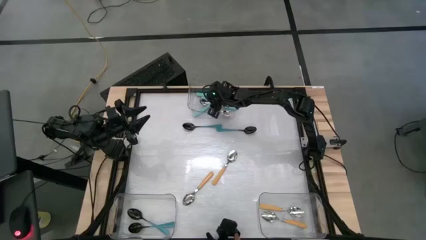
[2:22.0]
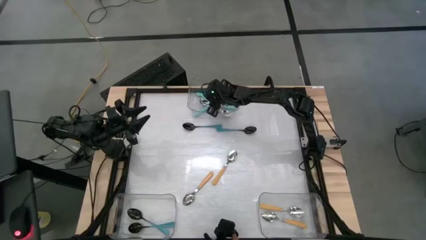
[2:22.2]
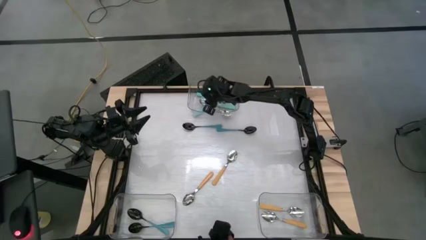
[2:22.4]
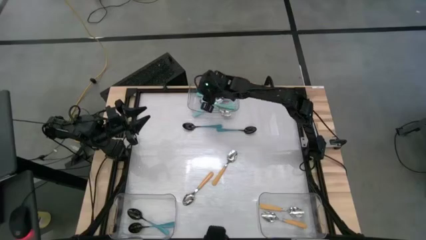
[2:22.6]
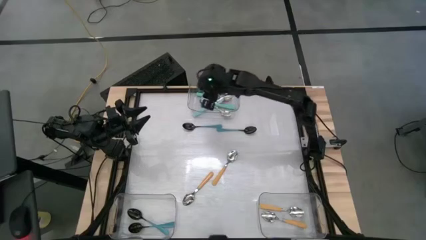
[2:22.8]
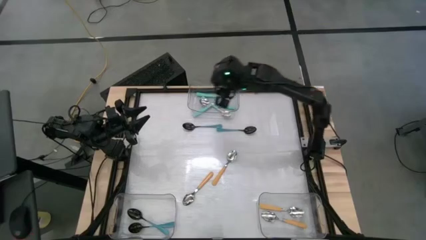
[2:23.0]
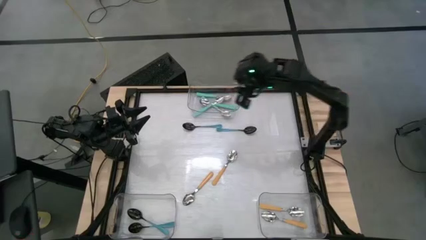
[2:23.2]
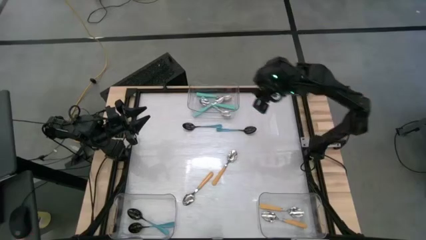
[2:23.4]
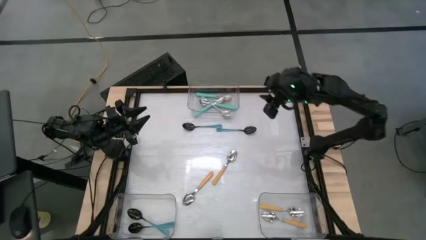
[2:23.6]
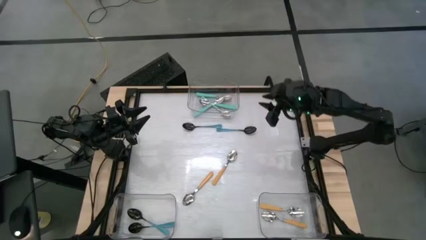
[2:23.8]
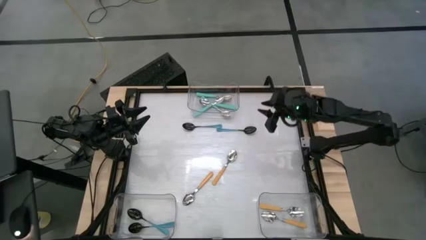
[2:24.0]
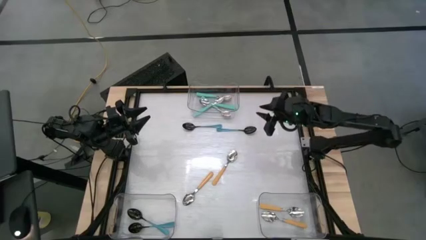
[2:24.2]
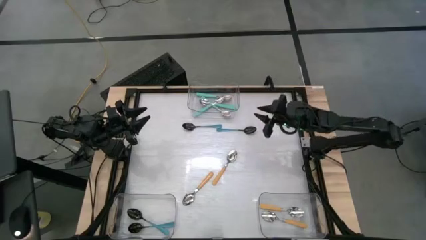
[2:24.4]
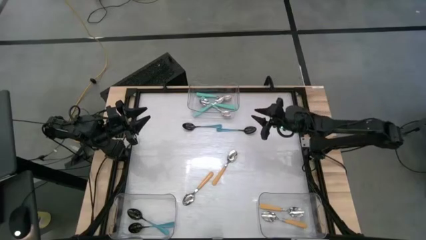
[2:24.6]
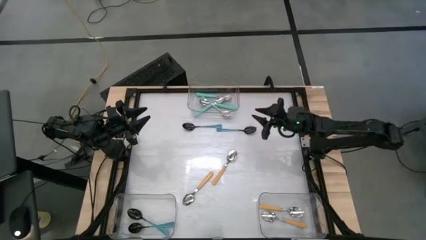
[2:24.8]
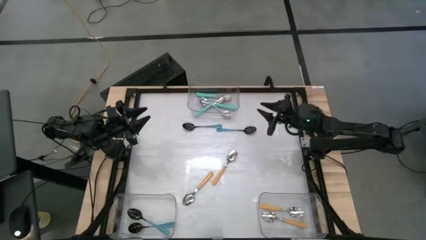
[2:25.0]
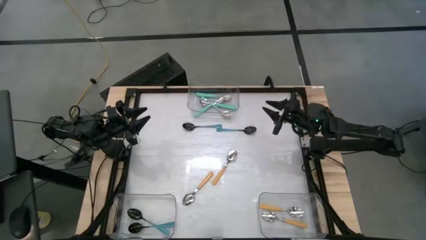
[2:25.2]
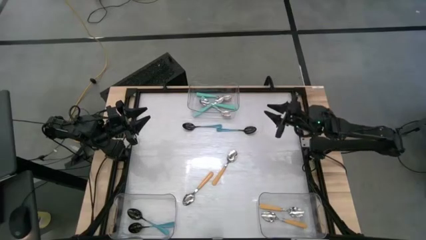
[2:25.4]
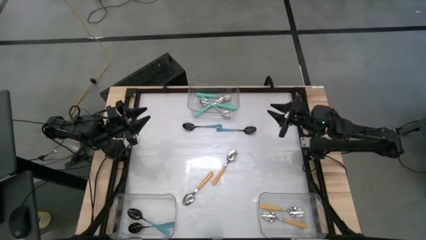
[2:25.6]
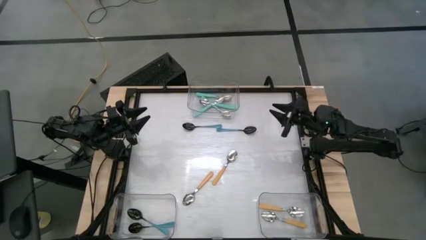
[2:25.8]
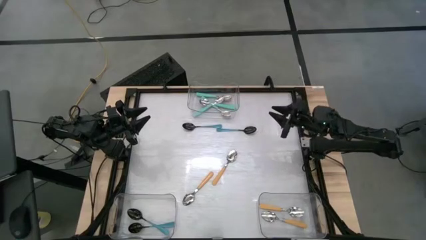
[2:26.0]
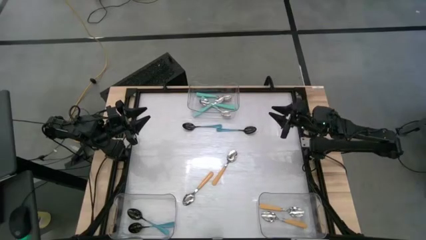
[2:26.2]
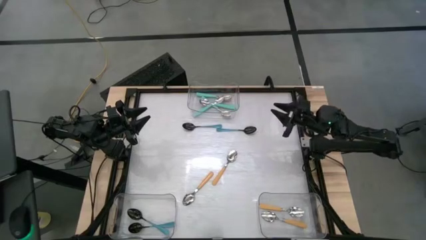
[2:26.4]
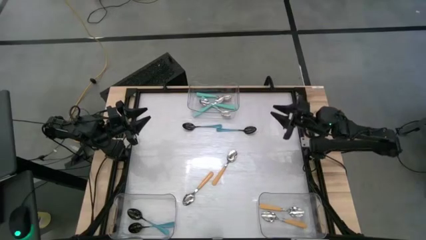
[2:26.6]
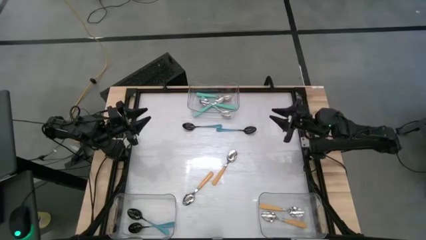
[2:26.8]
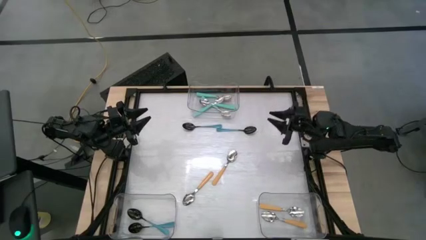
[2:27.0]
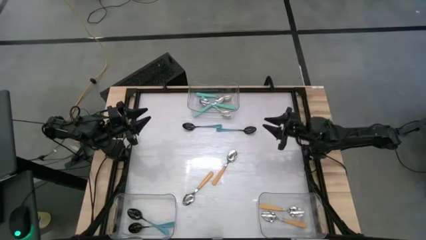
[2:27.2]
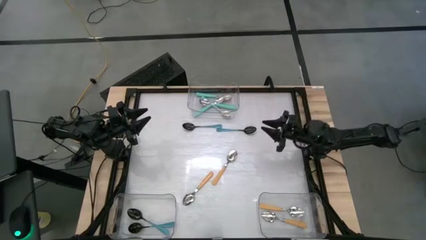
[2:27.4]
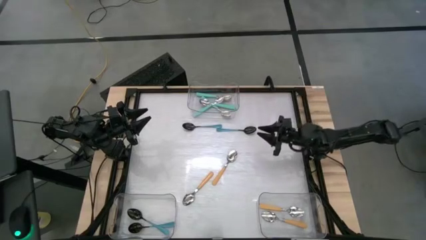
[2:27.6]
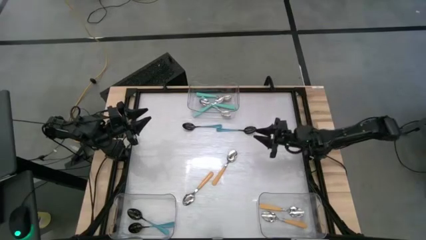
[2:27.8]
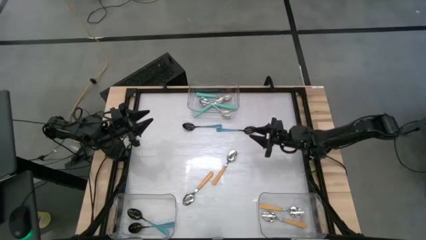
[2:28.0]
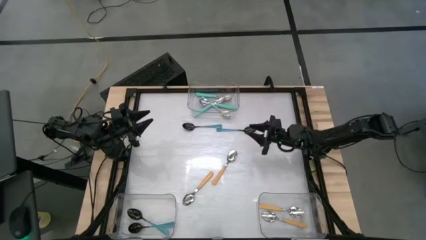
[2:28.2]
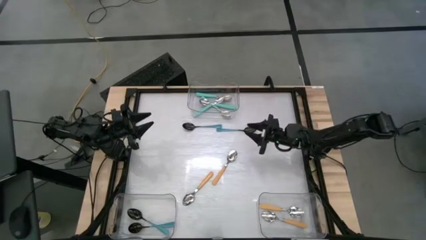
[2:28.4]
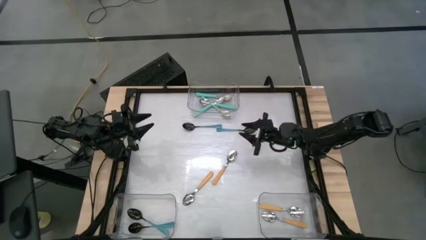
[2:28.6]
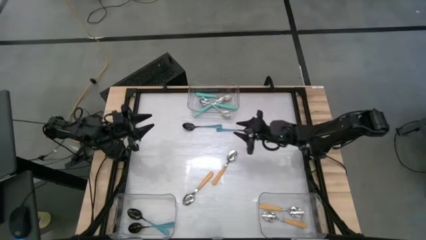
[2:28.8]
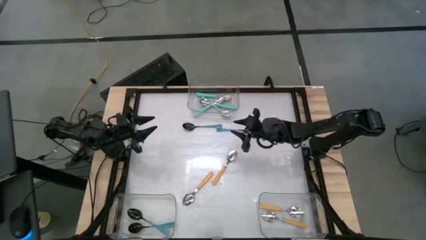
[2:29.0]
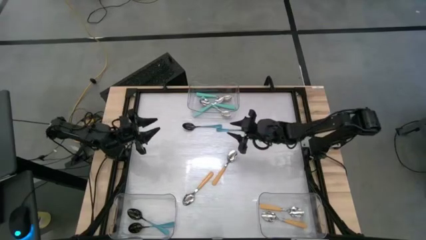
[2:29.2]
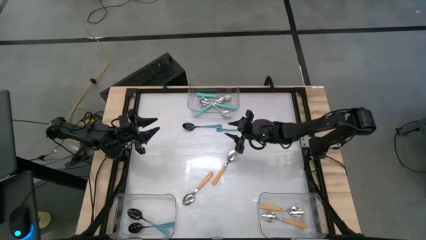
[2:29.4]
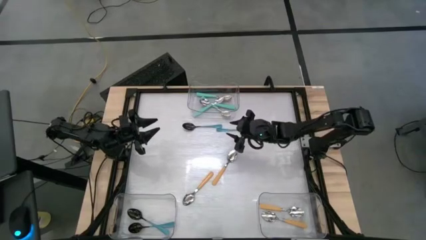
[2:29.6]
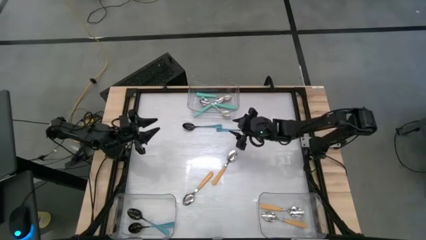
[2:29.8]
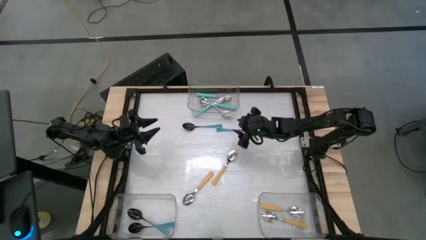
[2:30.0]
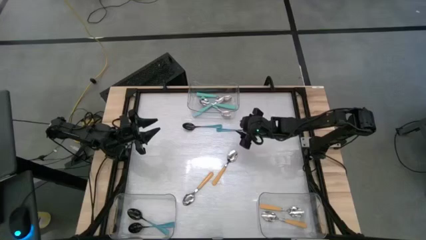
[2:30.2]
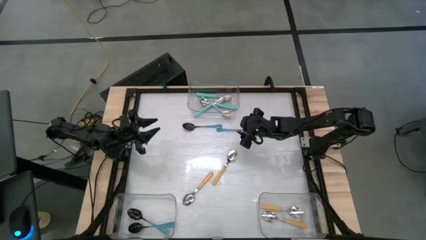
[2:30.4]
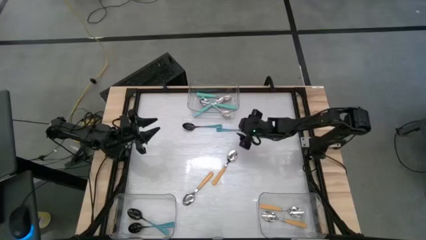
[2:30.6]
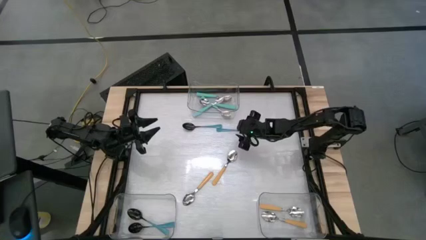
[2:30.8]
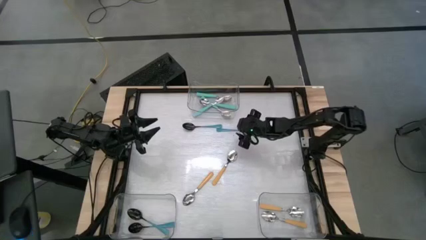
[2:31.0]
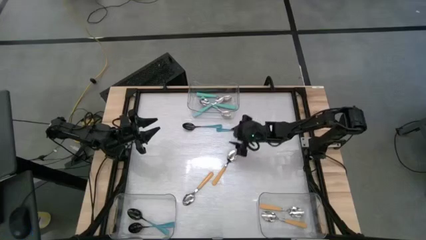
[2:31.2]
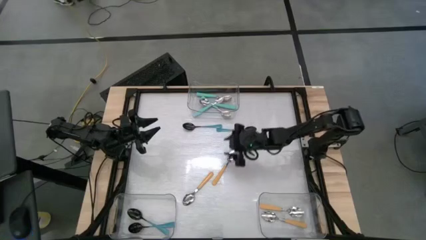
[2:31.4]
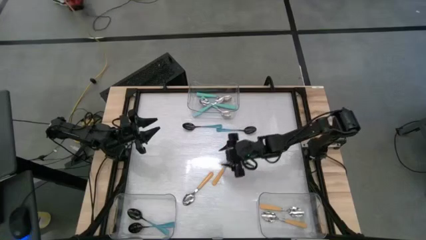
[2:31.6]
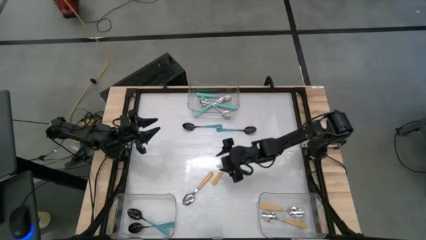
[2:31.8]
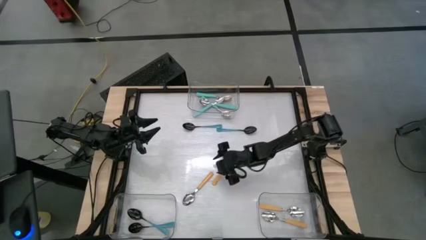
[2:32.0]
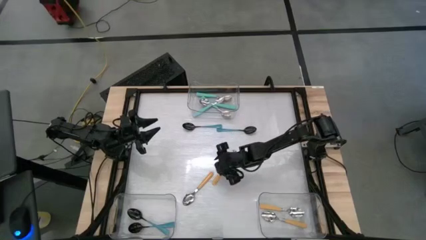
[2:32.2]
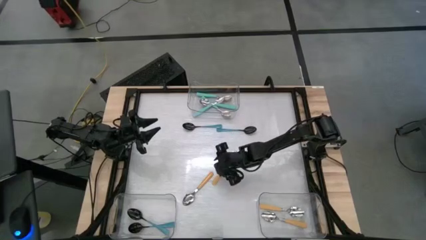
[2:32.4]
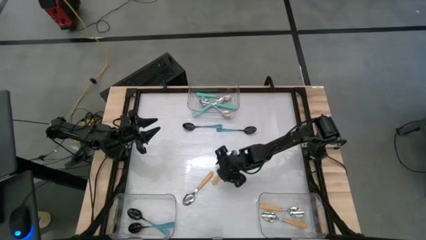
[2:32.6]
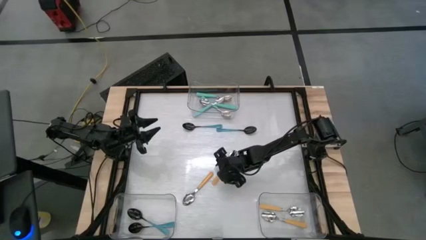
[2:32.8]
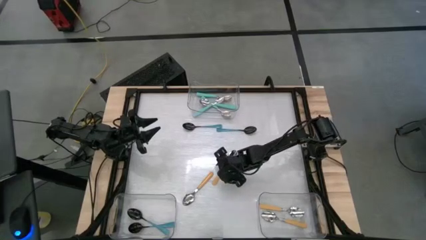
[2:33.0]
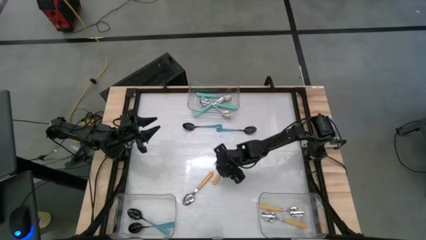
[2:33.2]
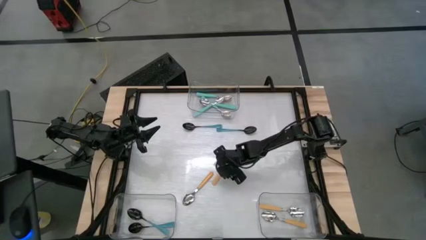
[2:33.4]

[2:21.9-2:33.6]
Task: Sort silverware by color (type)
Put the right orange spoon into the bottom right transparent bin

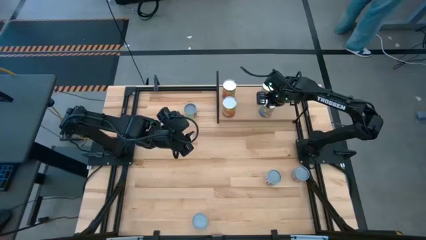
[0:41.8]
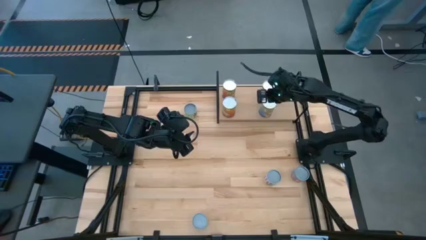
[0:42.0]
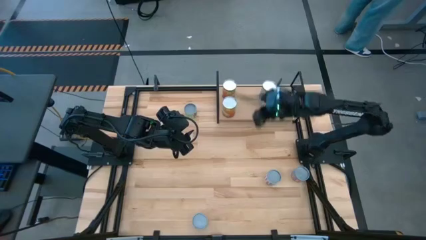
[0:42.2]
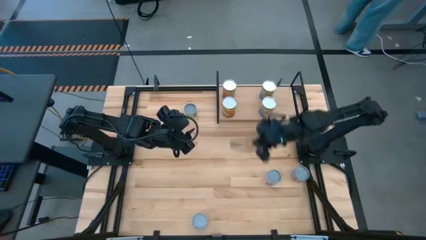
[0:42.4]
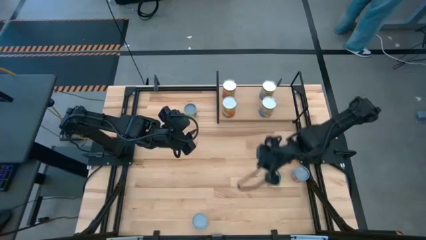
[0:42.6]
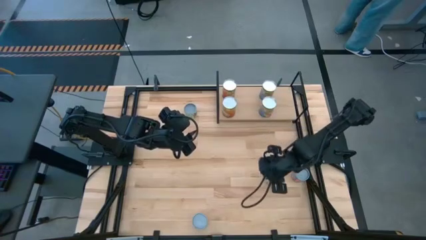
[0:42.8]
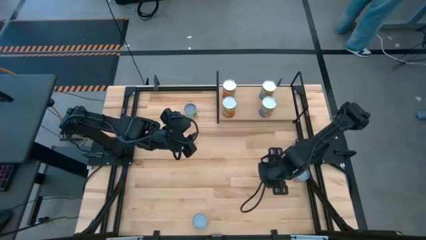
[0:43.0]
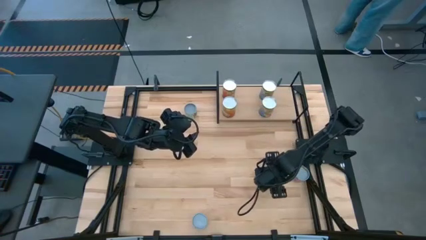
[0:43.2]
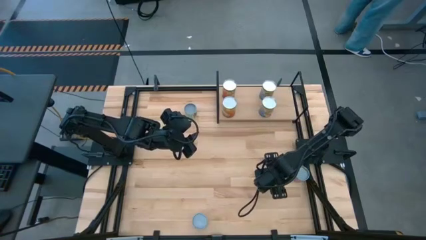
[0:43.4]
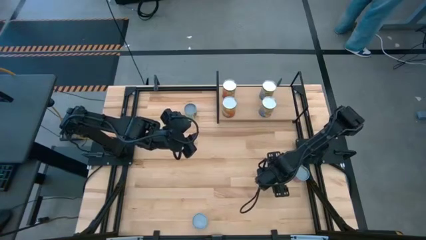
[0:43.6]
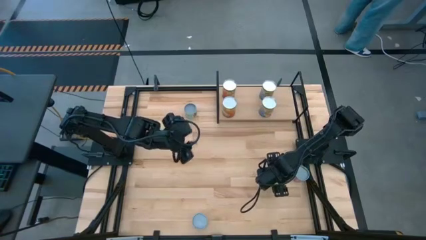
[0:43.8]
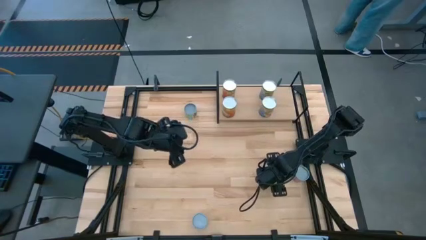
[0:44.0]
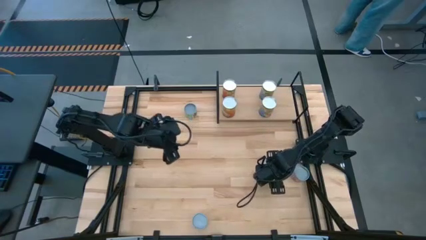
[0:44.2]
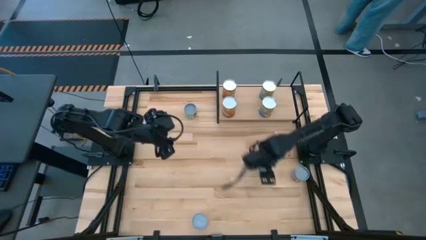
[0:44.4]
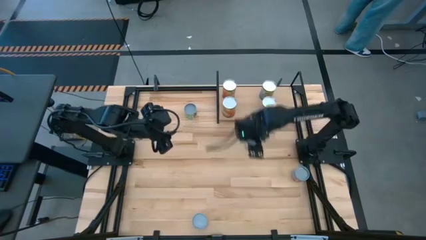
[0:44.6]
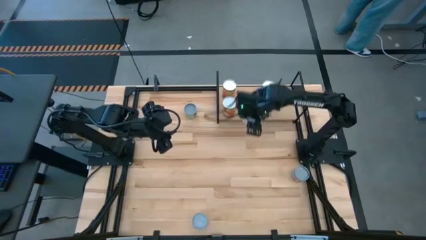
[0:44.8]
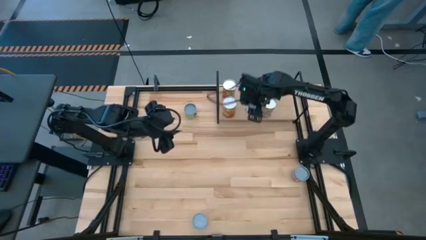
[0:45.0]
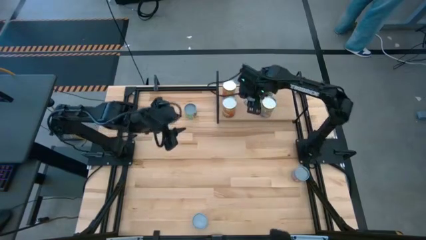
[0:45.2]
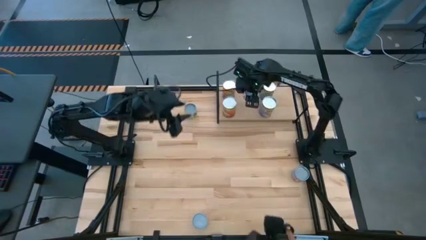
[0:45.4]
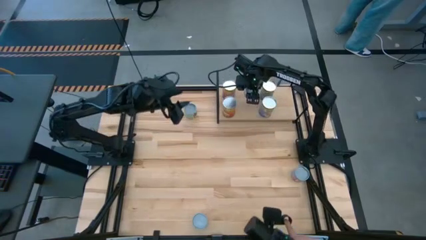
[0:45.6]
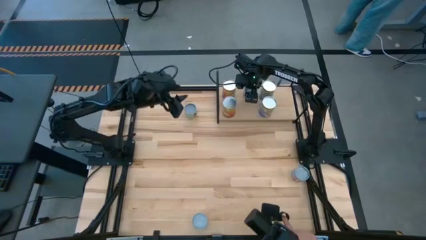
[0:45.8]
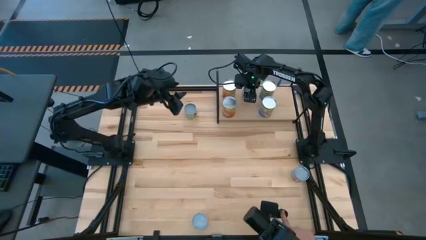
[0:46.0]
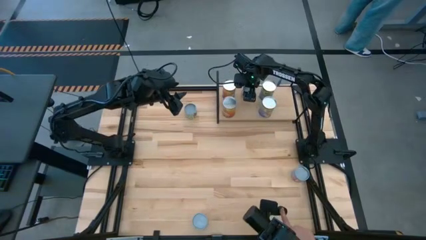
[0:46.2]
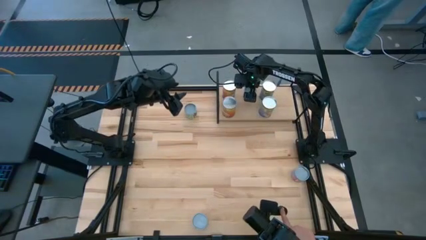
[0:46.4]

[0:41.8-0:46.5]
Task: Pick and place cans onto a shelf
Put the small white can on the shelf
